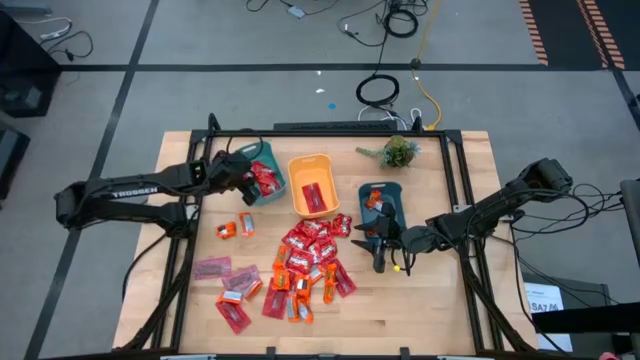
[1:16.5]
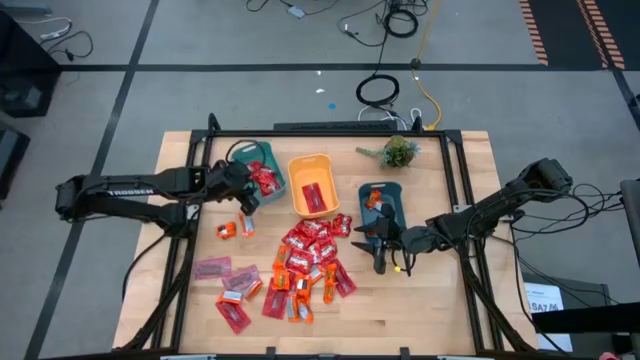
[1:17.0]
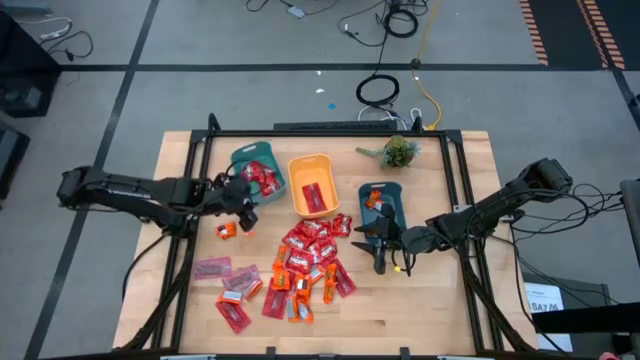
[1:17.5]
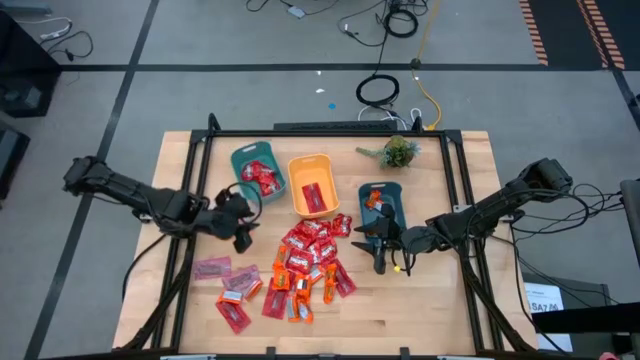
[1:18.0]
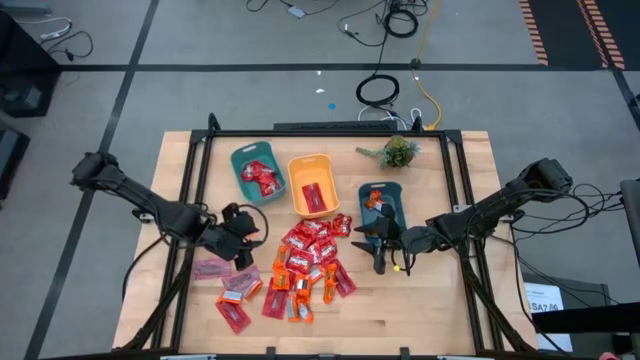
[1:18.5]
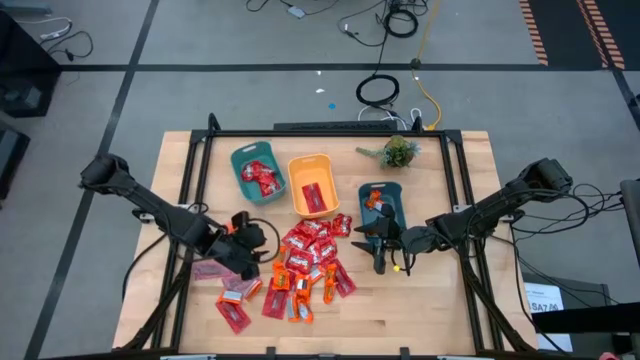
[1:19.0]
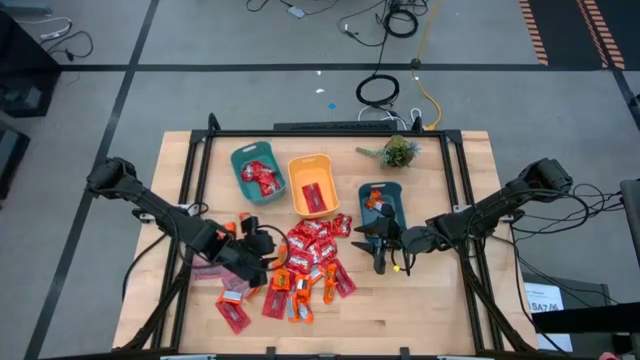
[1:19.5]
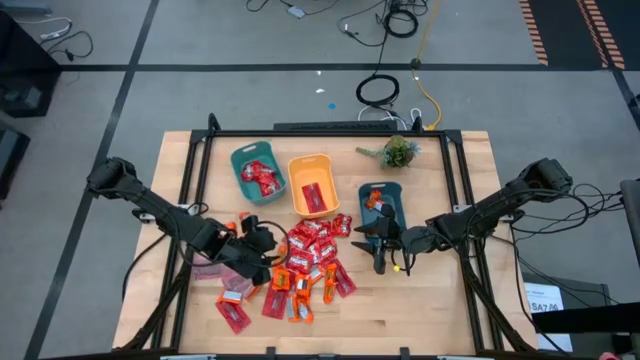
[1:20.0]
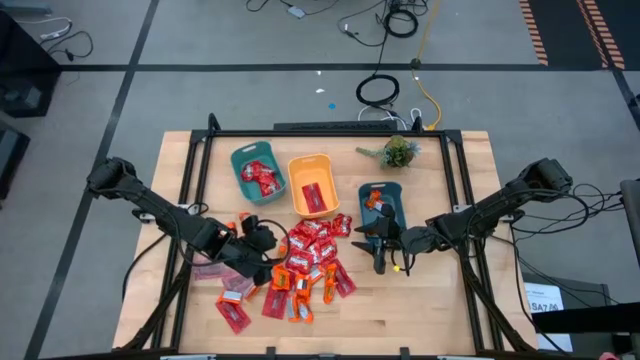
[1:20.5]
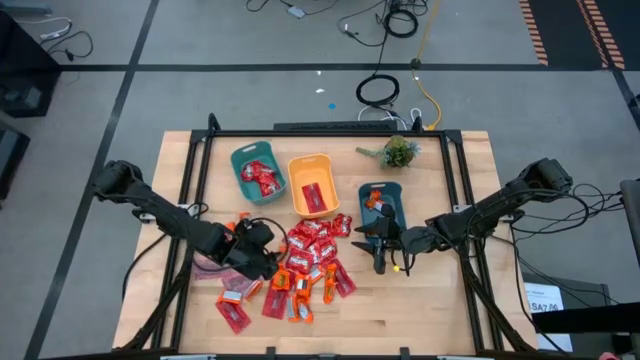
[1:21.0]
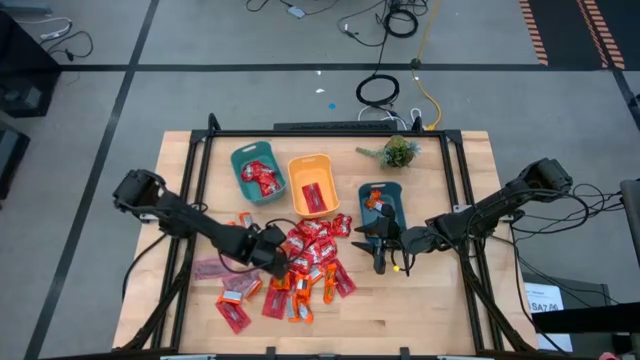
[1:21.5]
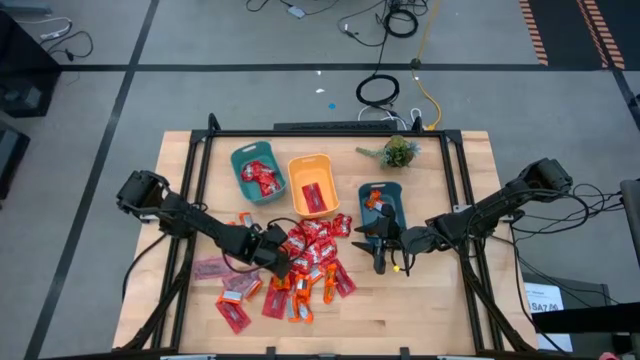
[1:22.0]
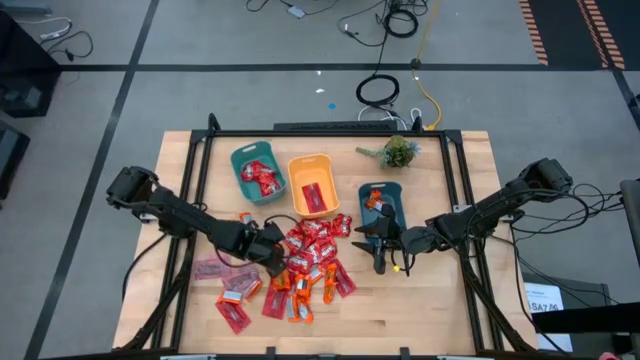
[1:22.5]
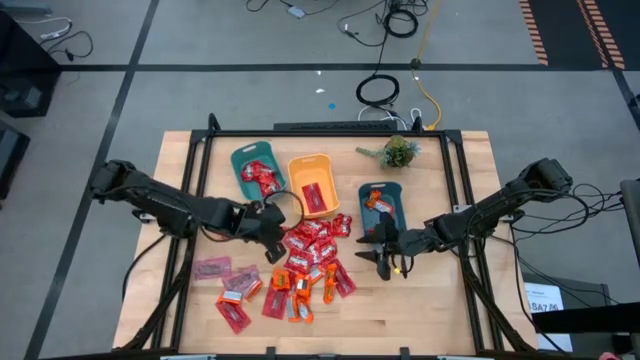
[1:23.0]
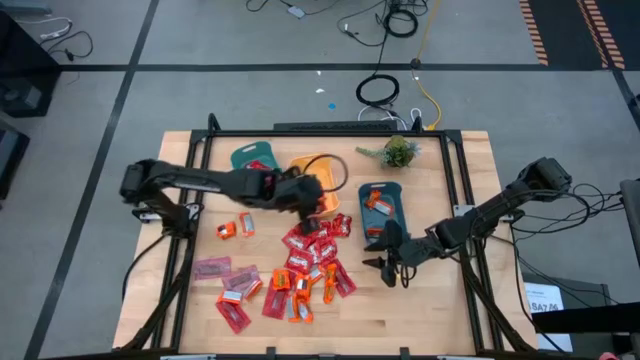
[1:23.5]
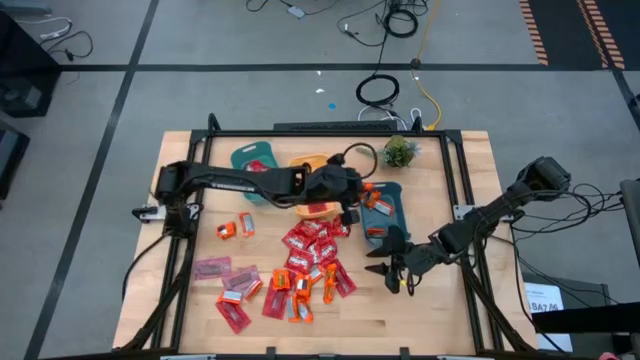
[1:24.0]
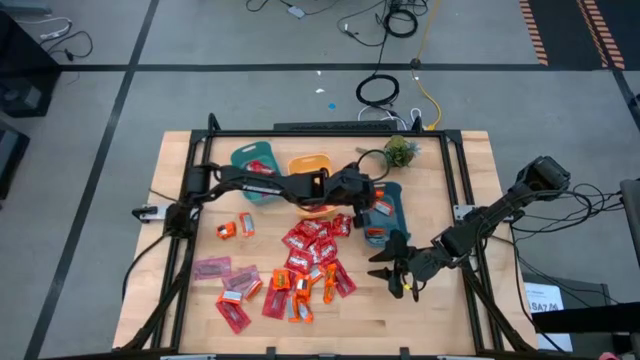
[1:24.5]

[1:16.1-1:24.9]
Task: Sort candy
Put the orange wrapper chocolate into the dark blue bin

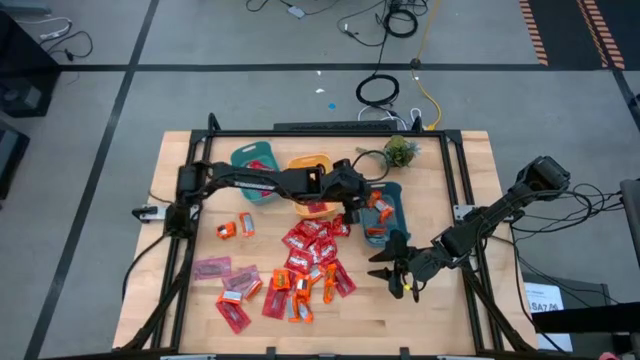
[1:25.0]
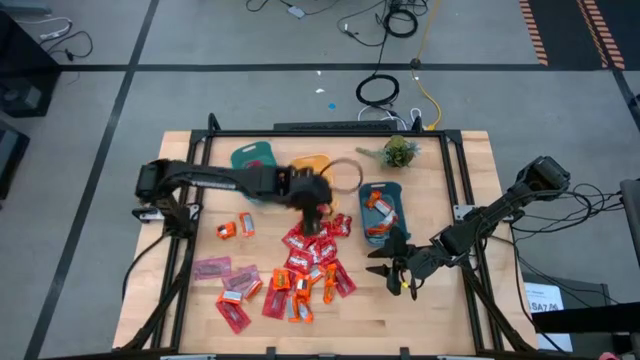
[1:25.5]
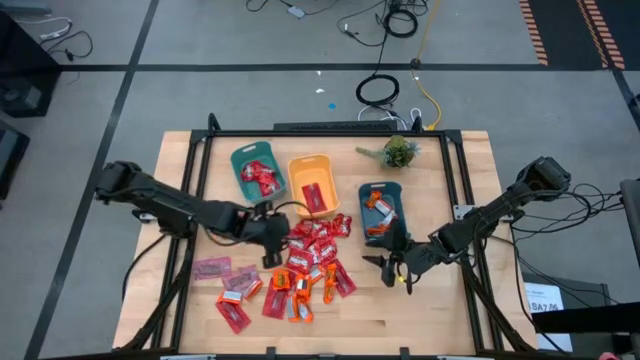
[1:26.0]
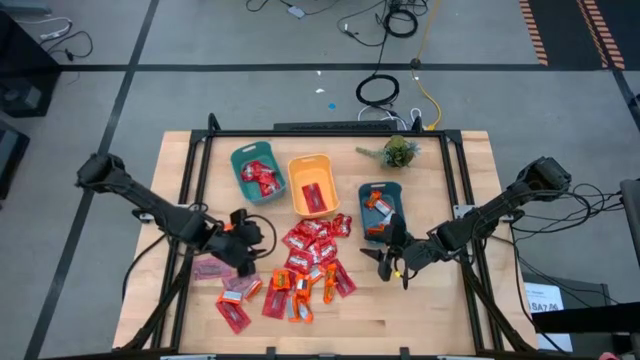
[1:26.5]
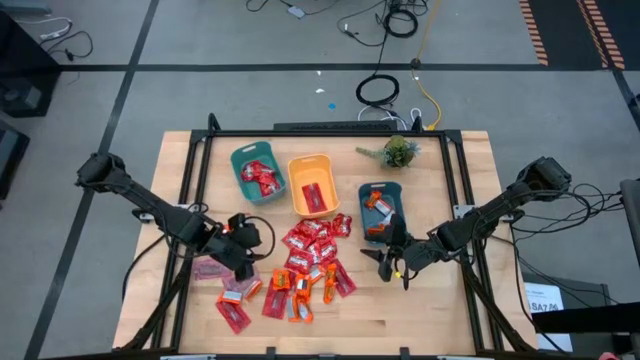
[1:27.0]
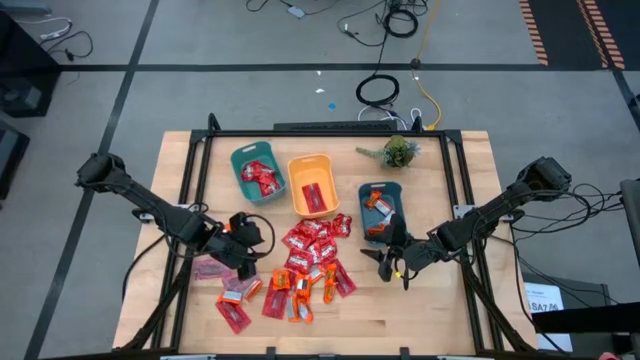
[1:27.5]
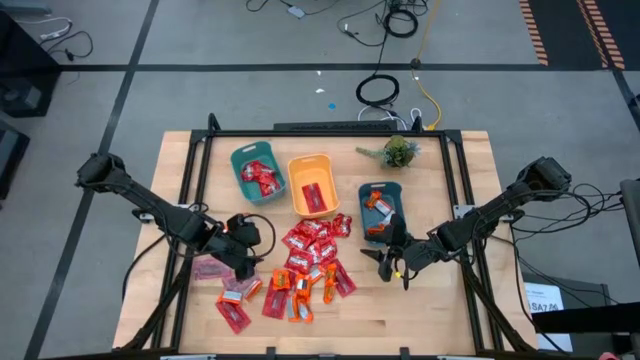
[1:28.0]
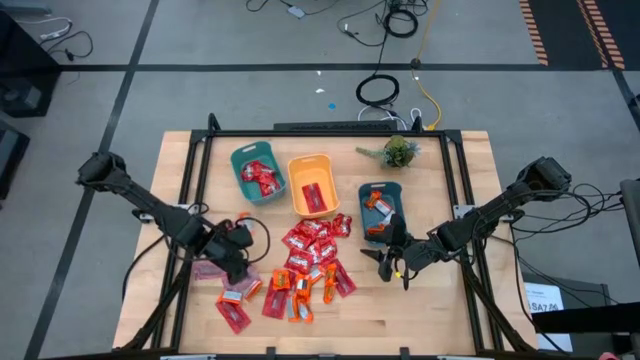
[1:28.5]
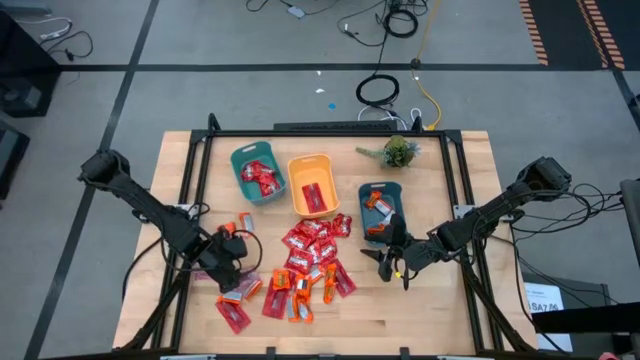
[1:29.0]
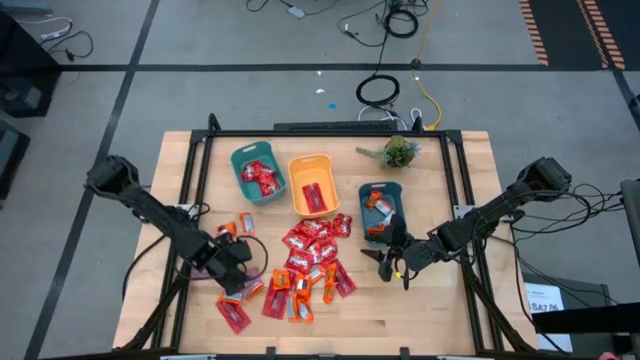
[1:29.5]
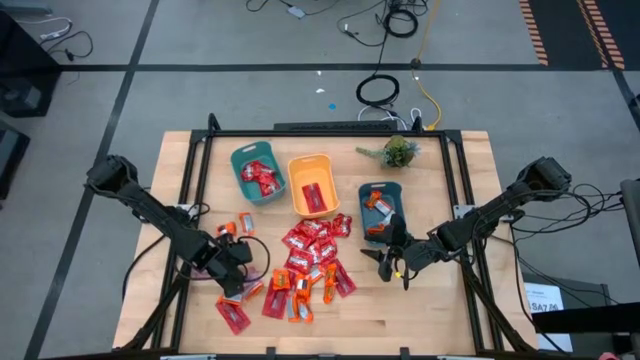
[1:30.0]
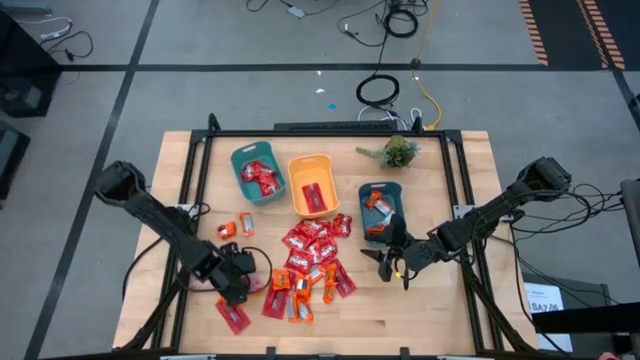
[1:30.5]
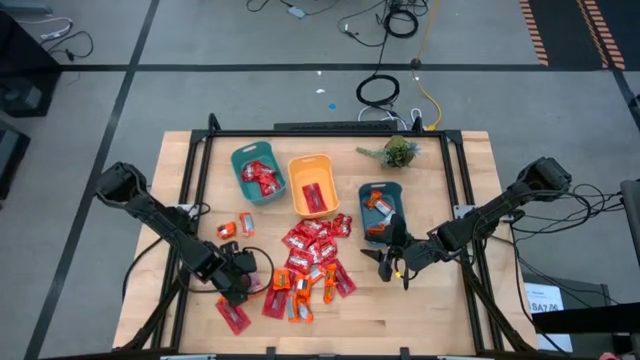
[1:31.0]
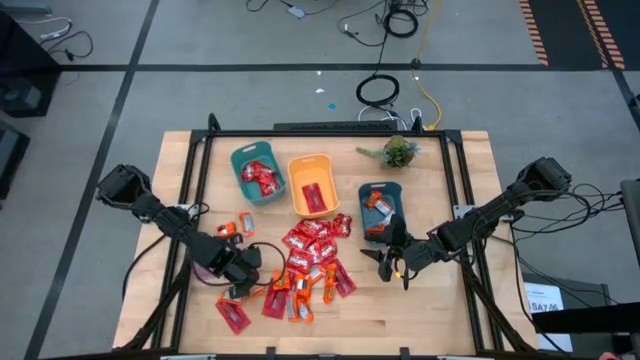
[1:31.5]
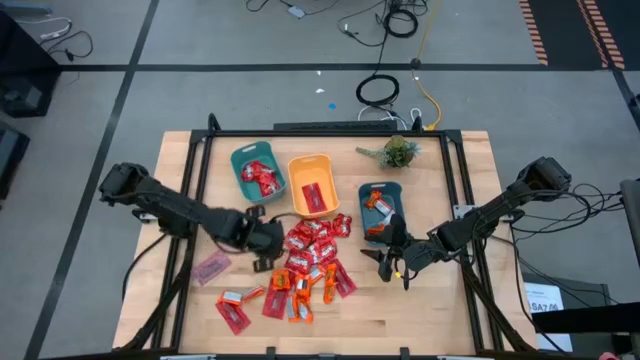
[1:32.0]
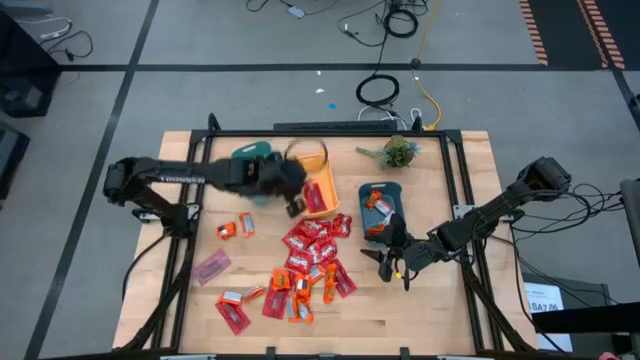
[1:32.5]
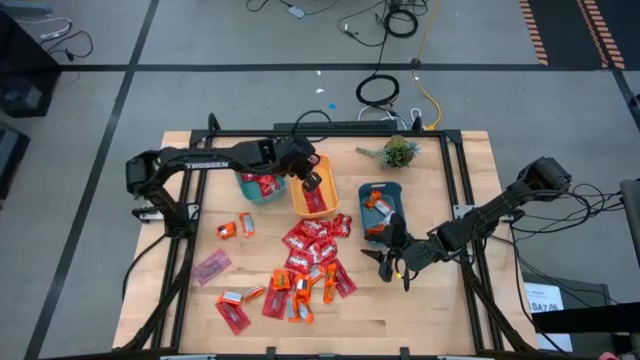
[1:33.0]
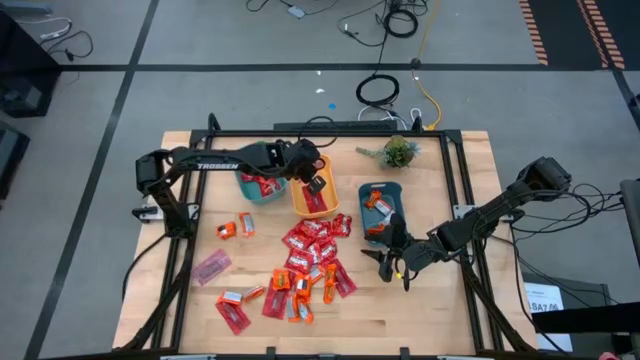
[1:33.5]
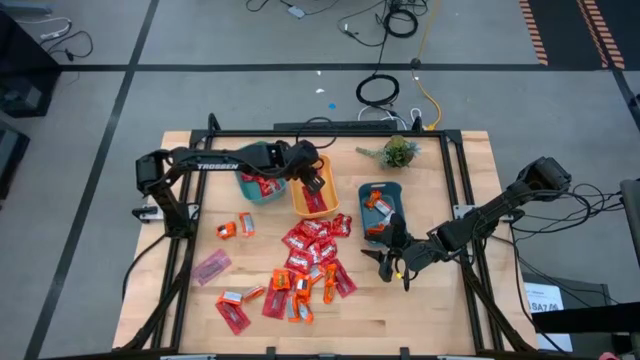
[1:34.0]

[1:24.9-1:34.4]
Put the pink wrapper gummy into the yellow bin

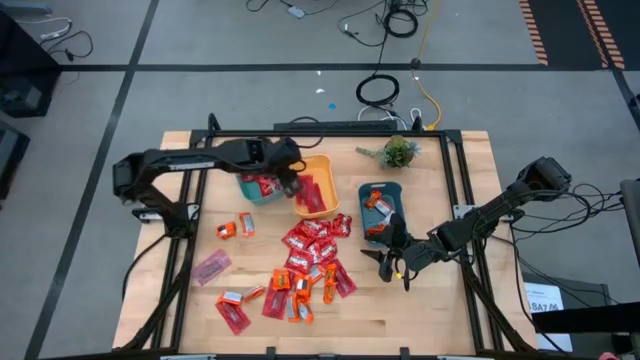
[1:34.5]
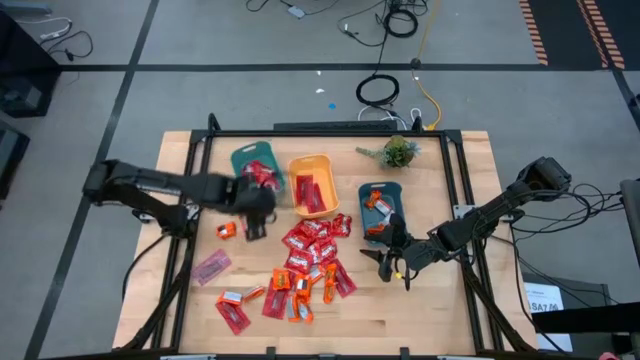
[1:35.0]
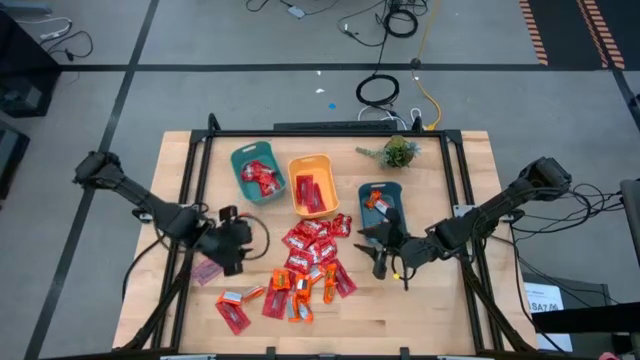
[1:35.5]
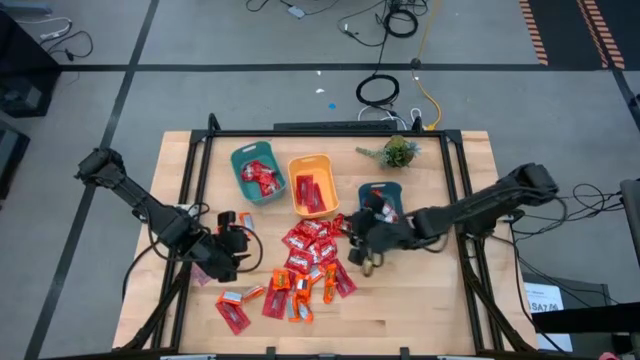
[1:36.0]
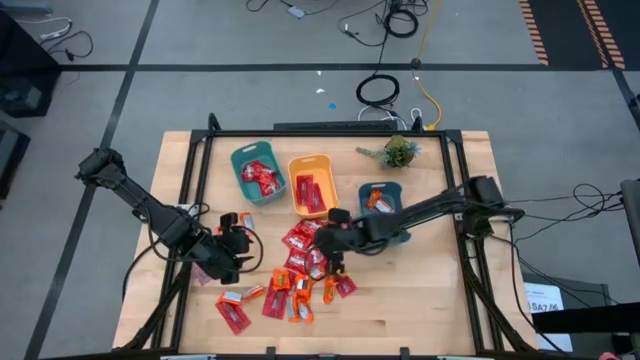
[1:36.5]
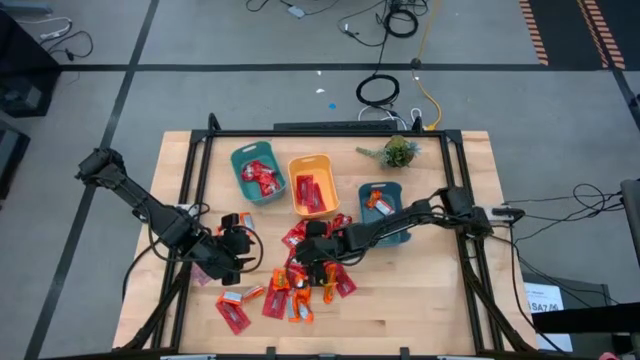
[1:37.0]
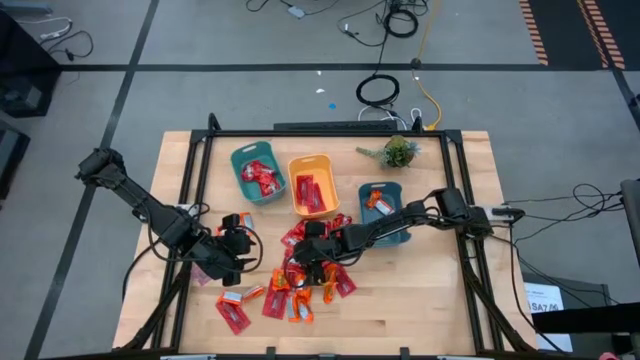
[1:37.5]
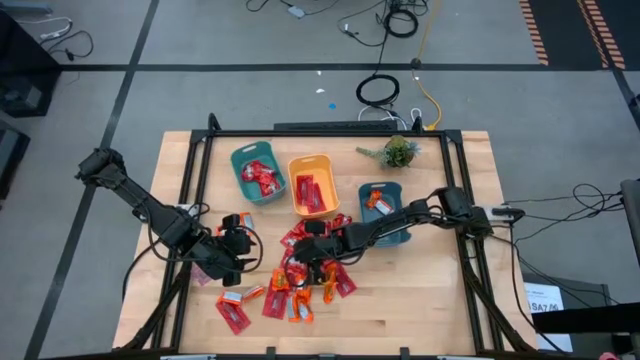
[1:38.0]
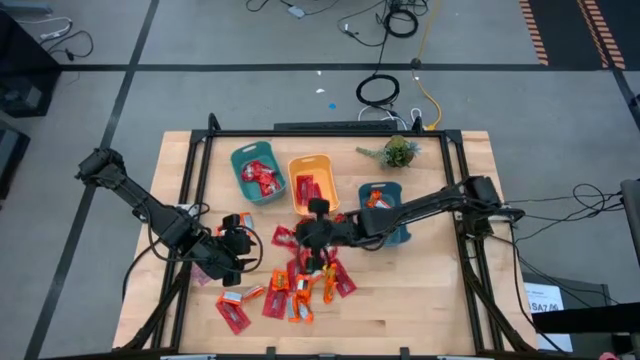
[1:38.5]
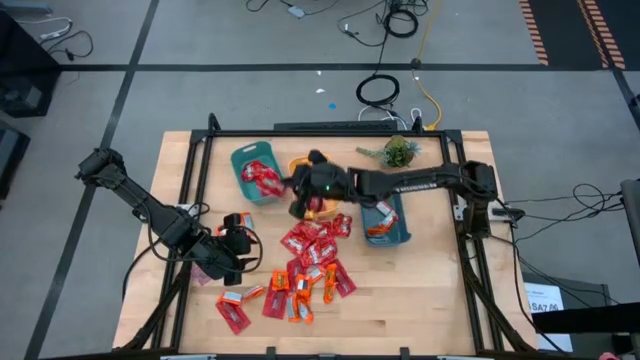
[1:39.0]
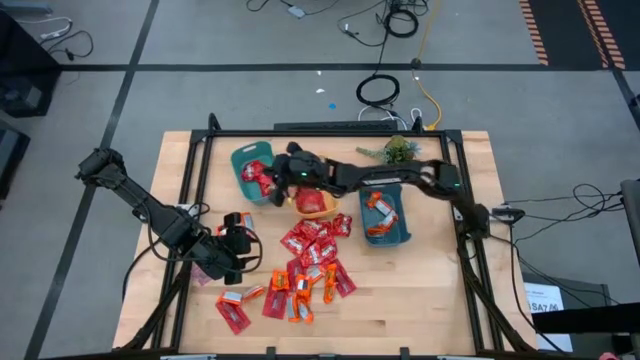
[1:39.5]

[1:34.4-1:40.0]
Put the red pack of candy into the light blue bin
